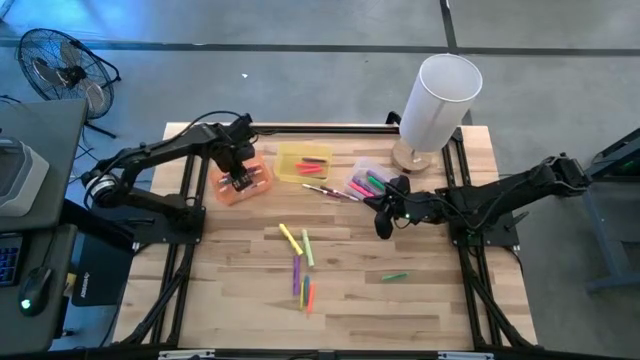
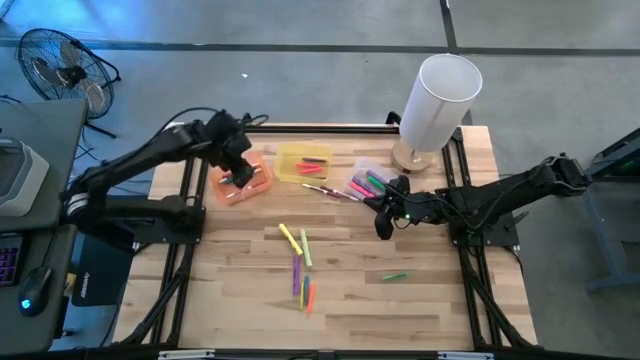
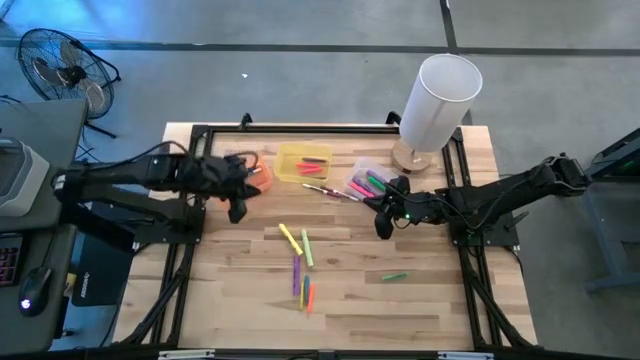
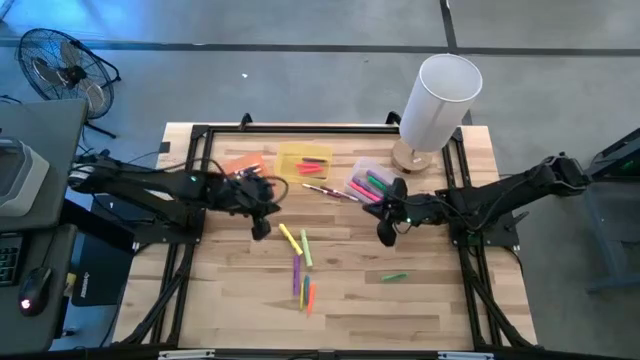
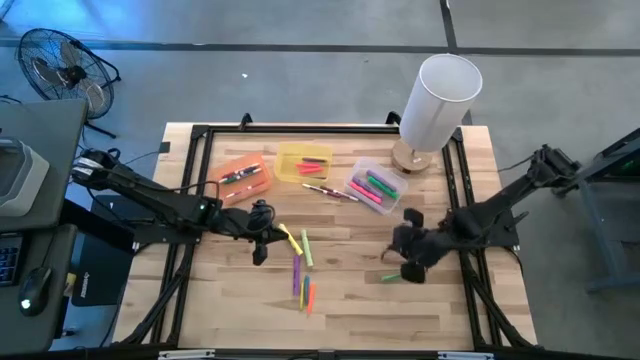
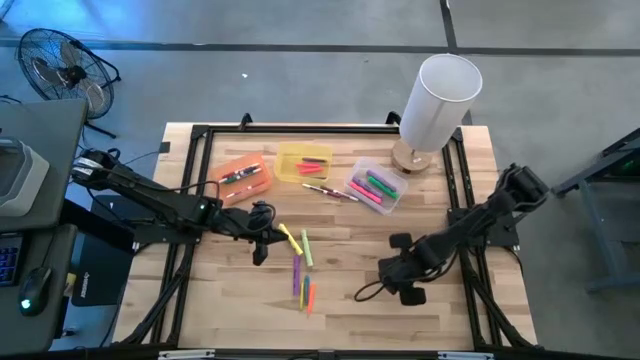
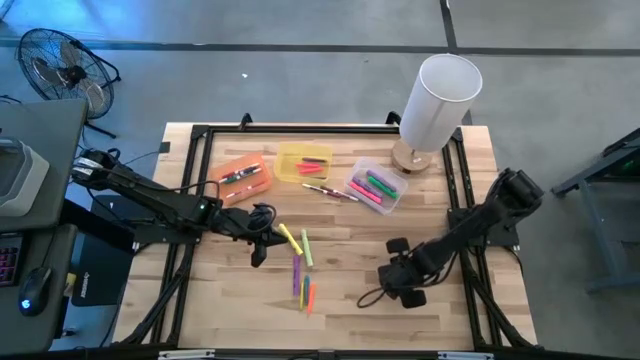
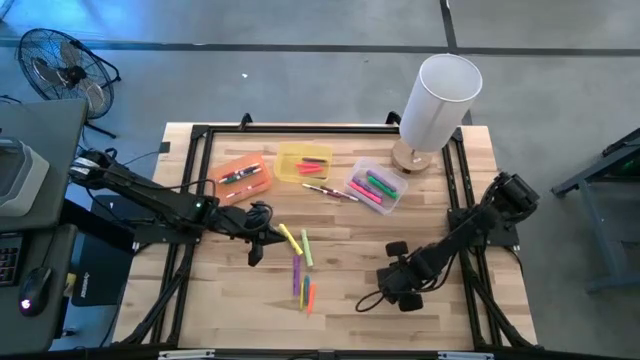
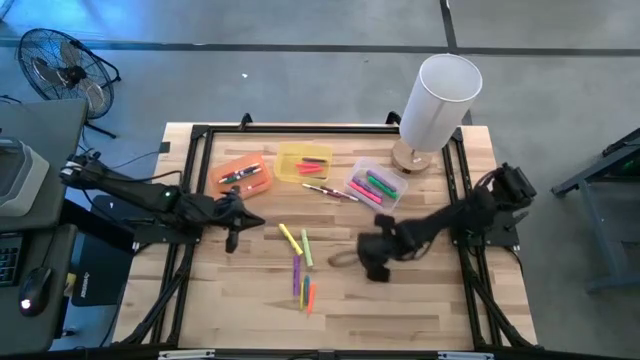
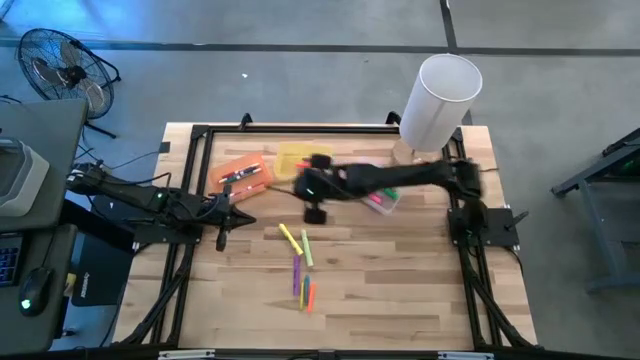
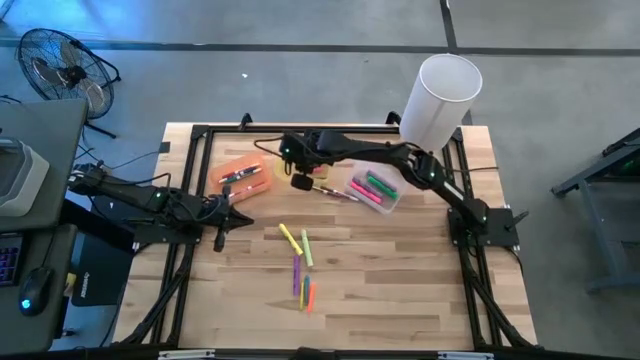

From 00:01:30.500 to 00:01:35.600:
Task: Pick & Place Markers
Put the green pen into the yellow bin

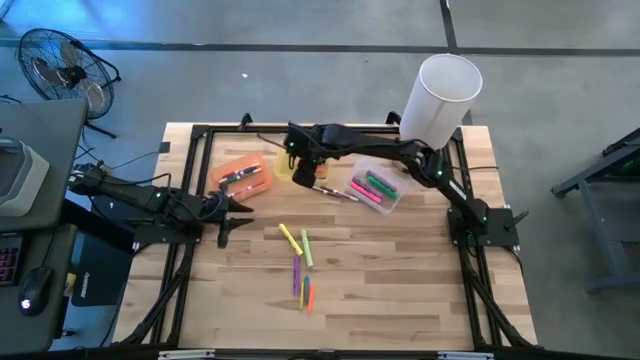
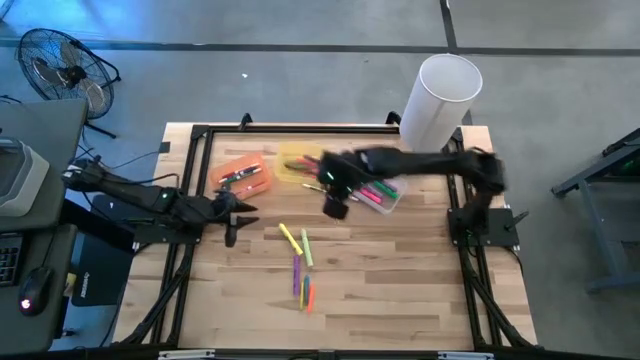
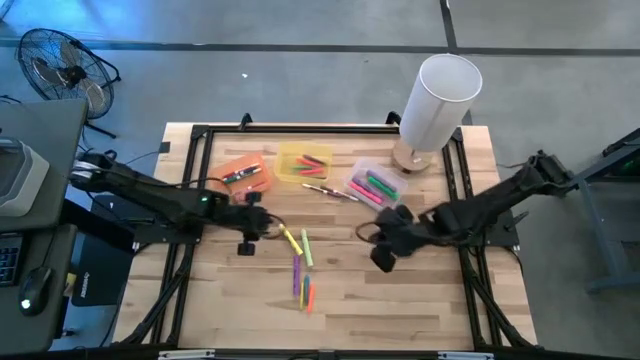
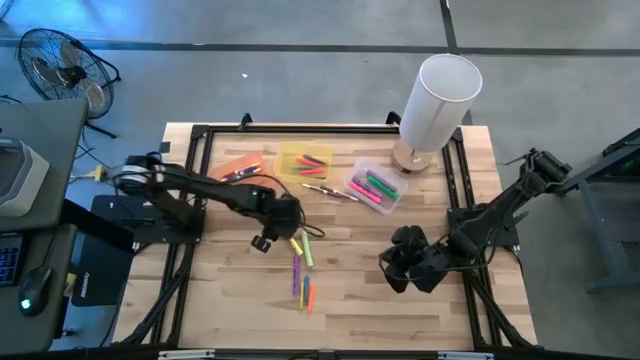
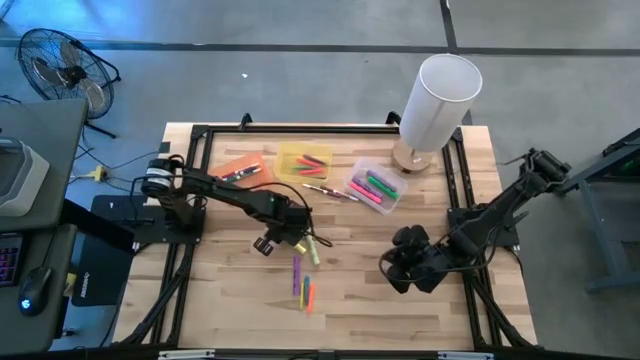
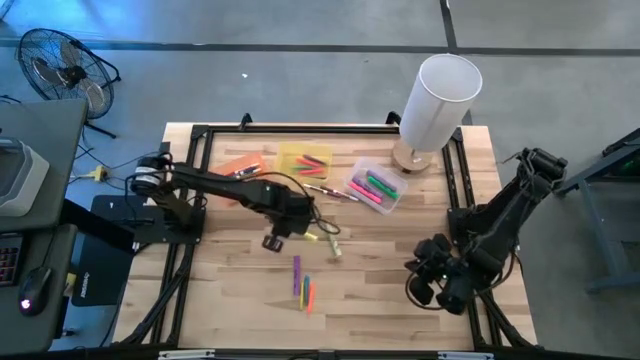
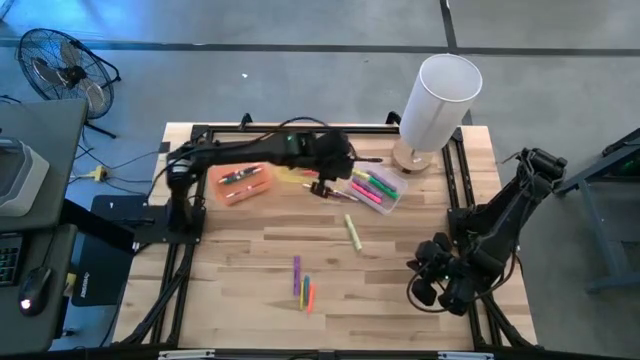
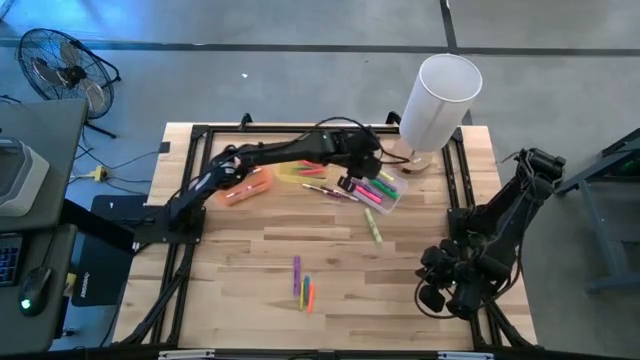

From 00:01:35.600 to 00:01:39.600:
Put the yellow highlighter pen into the white bin

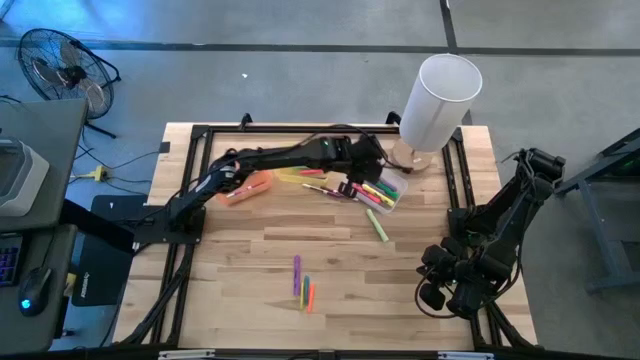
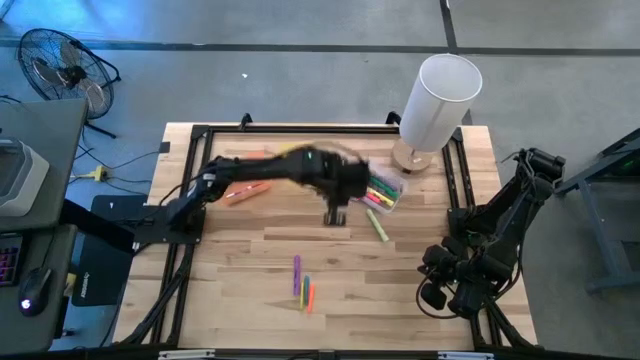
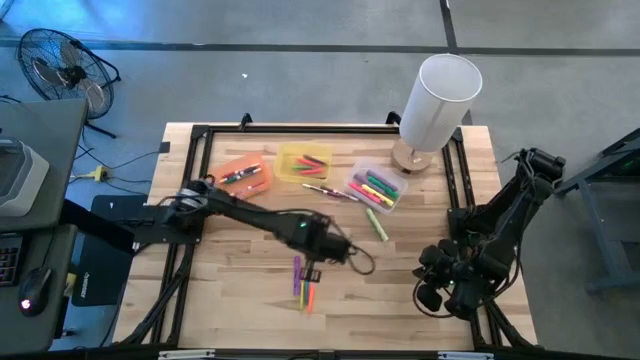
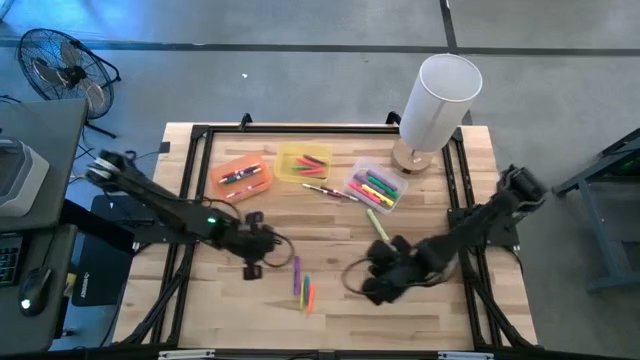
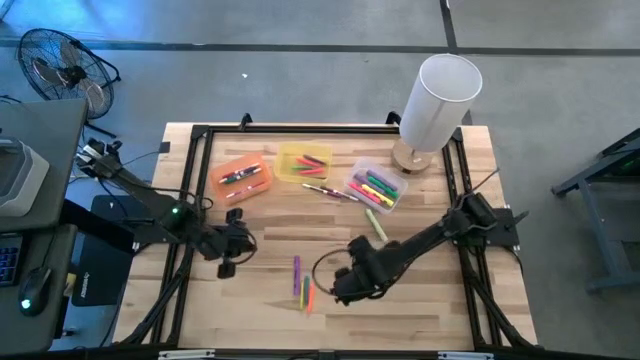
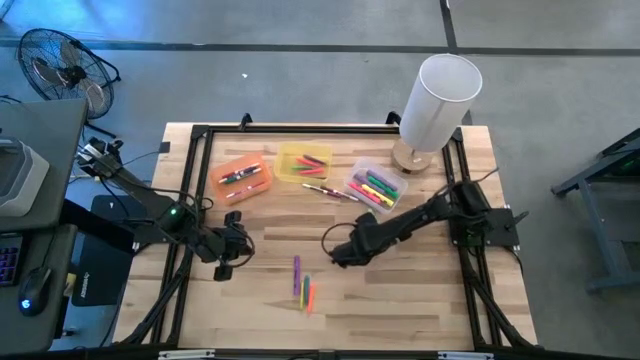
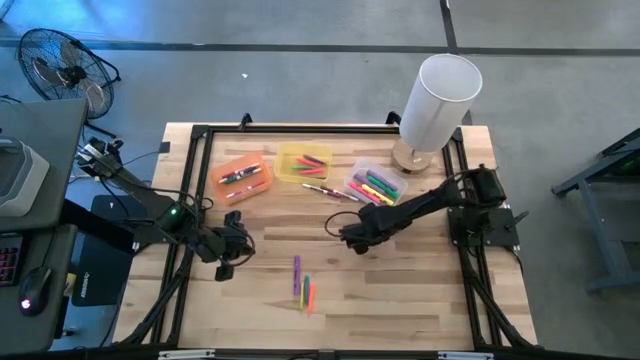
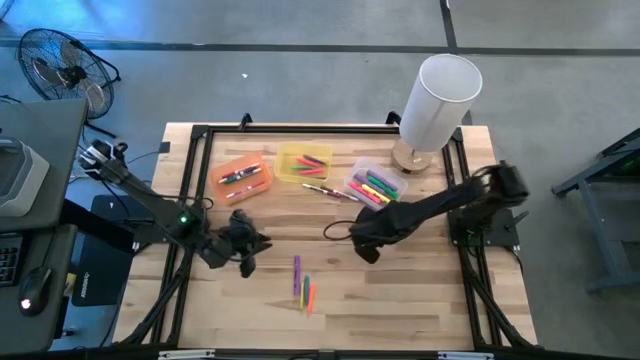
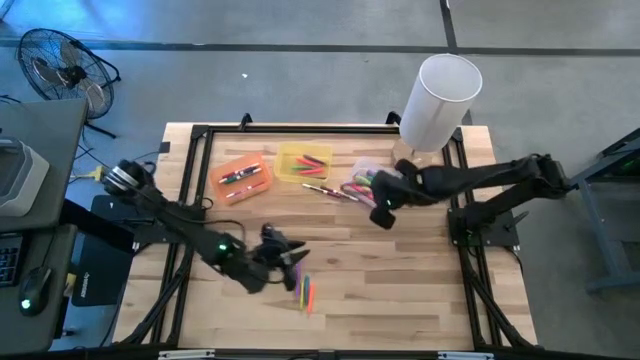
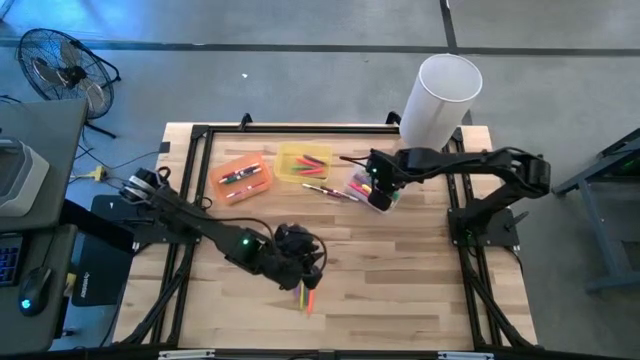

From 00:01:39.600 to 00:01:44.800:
Put the light green highlighter pen into the white bin

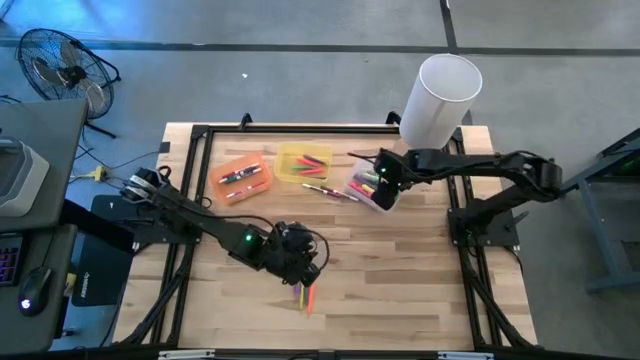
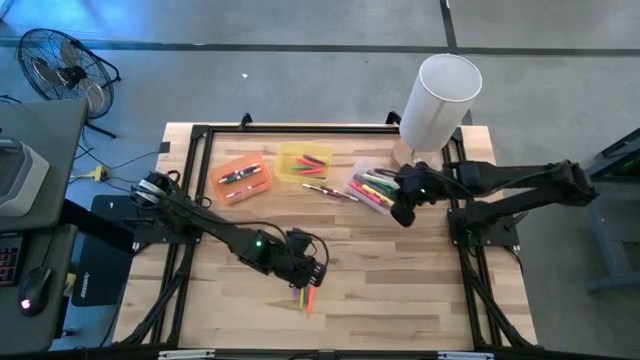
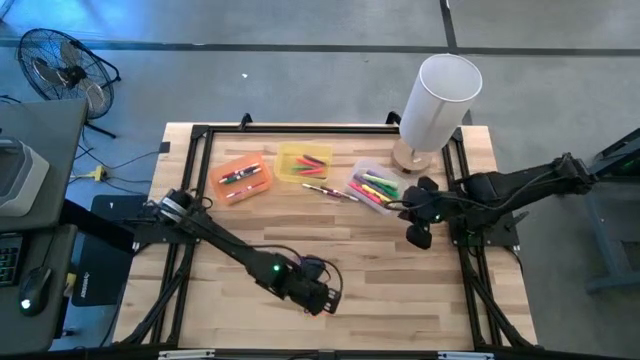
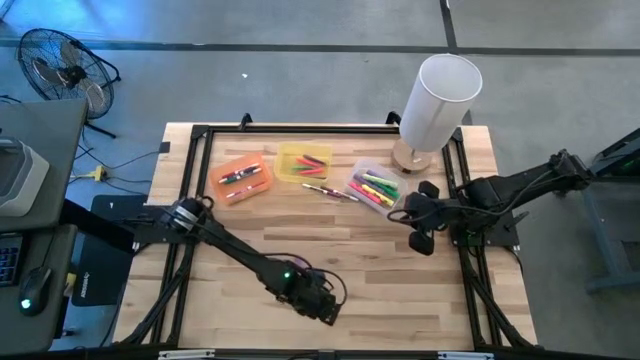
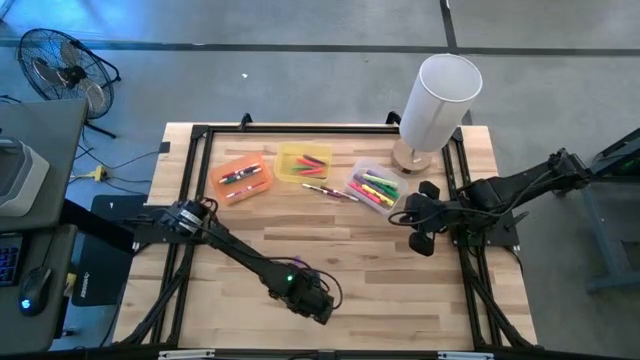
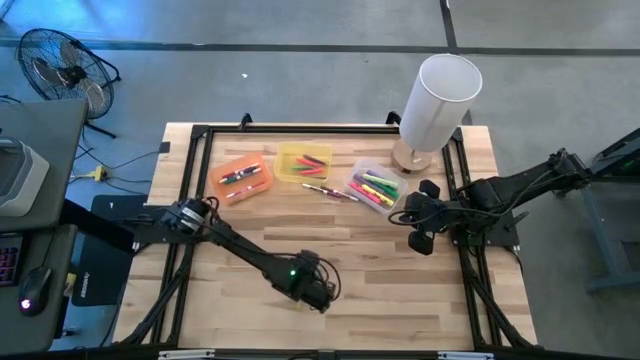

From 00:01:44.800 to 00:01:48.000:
Adjust the pens on the table

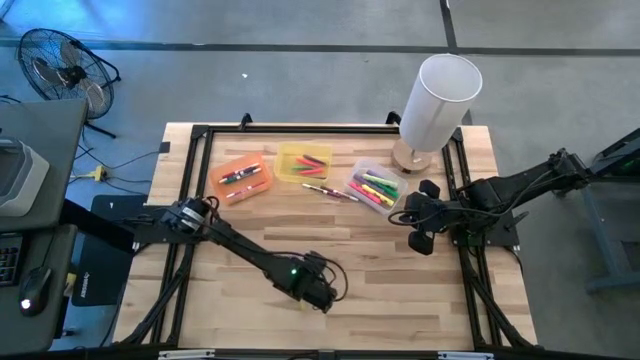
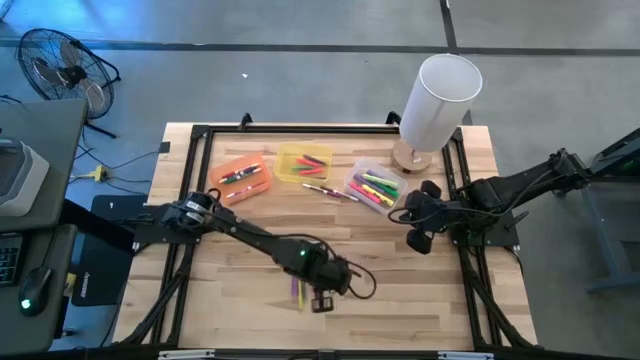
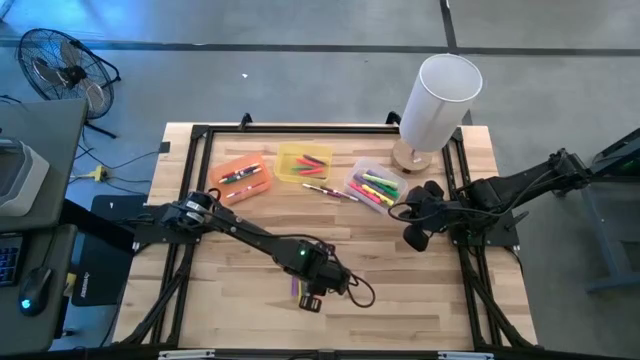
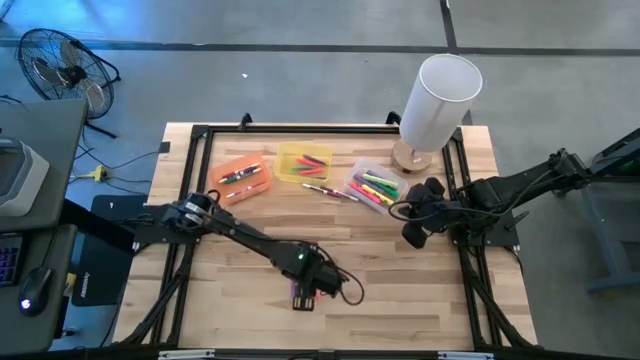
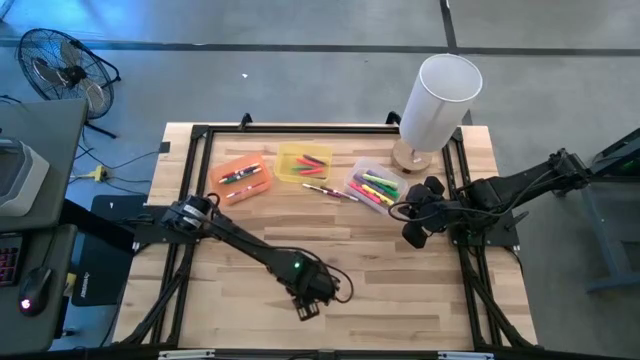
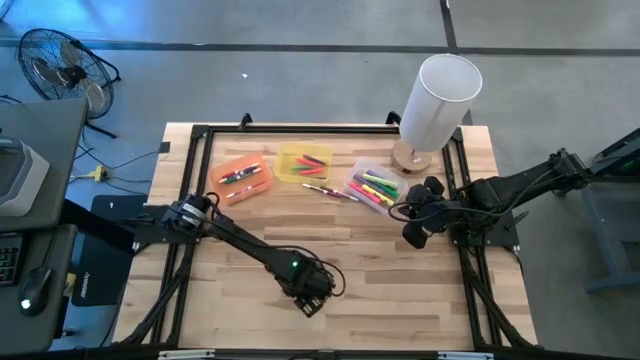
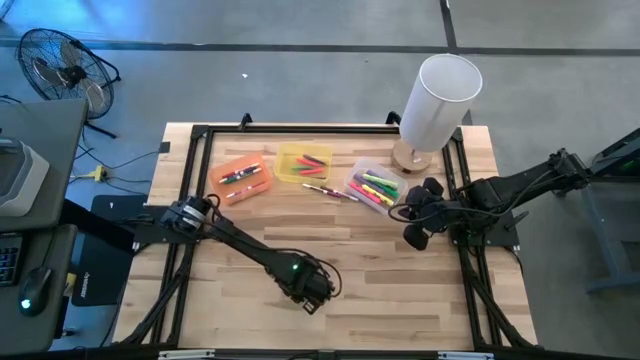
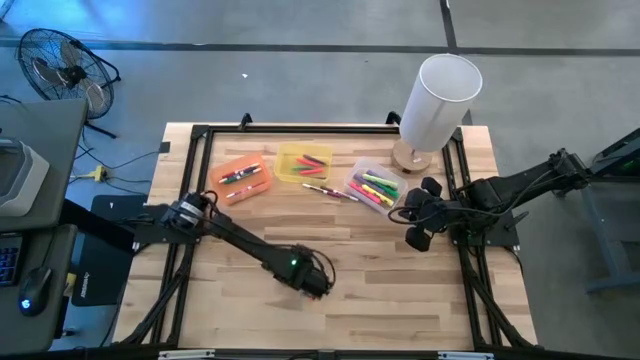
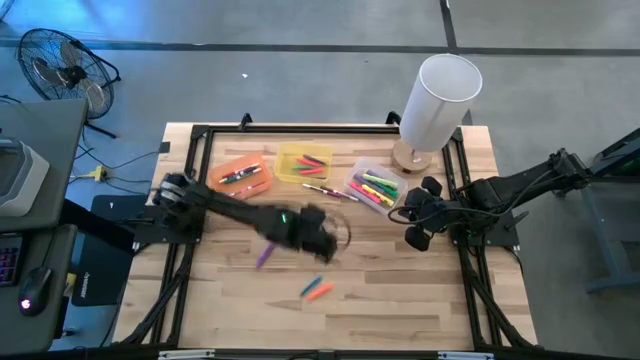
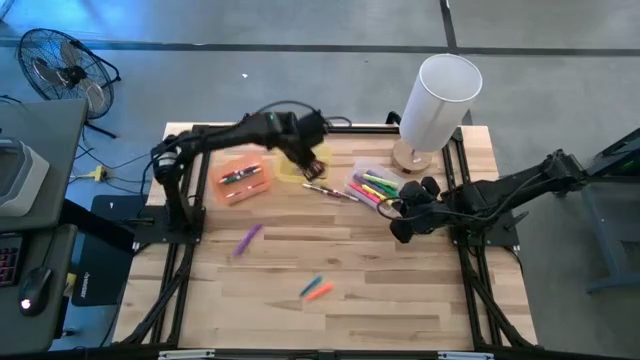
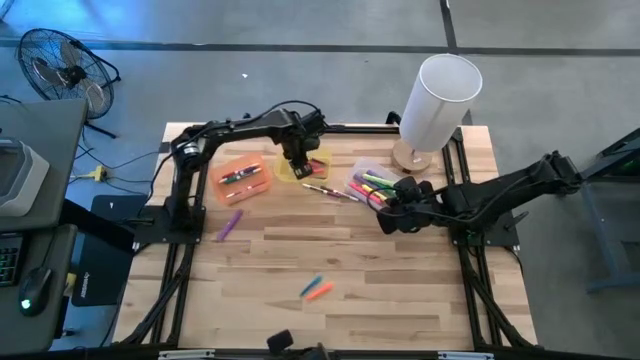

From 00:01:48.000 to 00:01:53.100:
Put the yellow pen into the yellow bin
